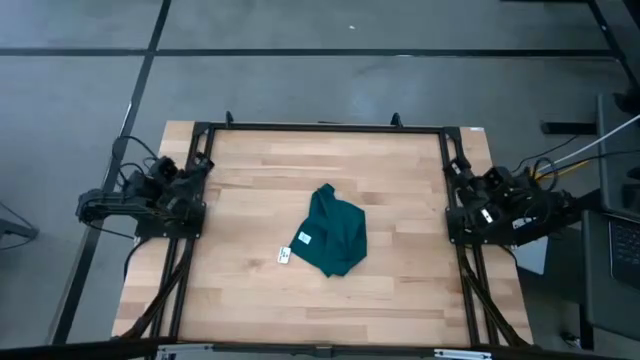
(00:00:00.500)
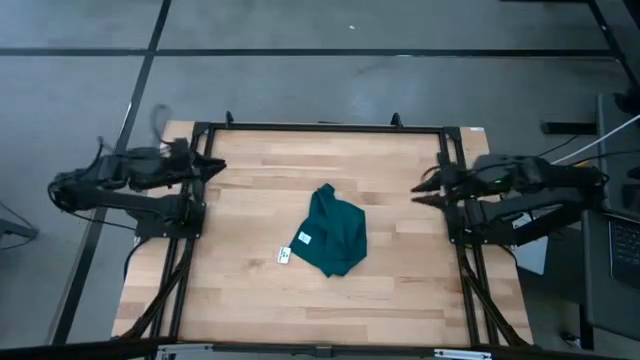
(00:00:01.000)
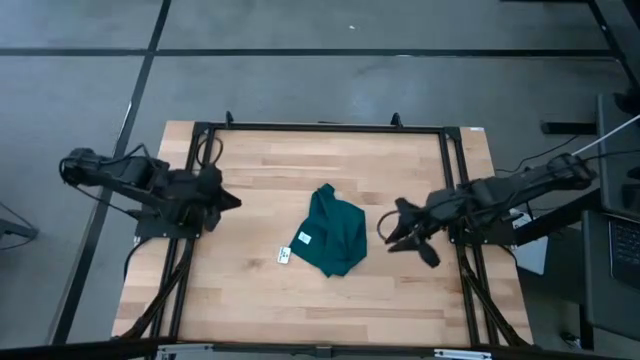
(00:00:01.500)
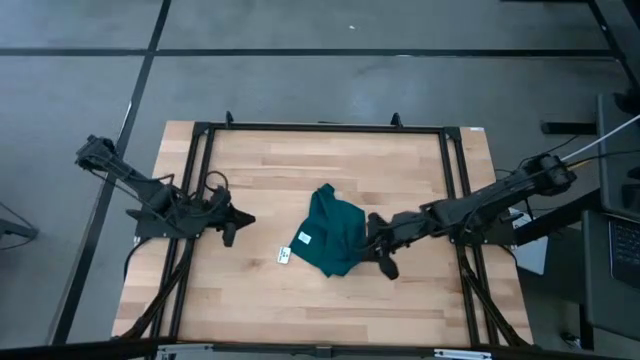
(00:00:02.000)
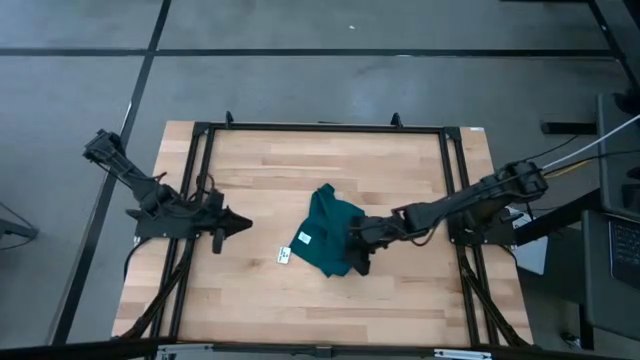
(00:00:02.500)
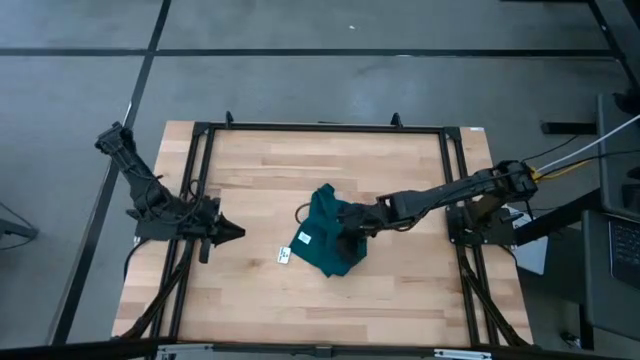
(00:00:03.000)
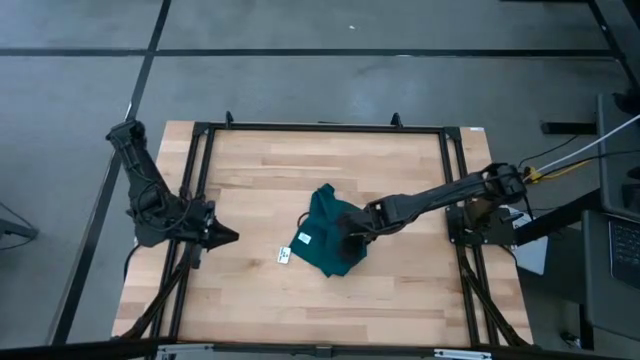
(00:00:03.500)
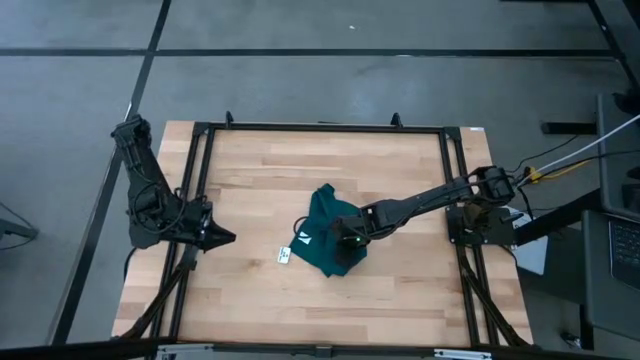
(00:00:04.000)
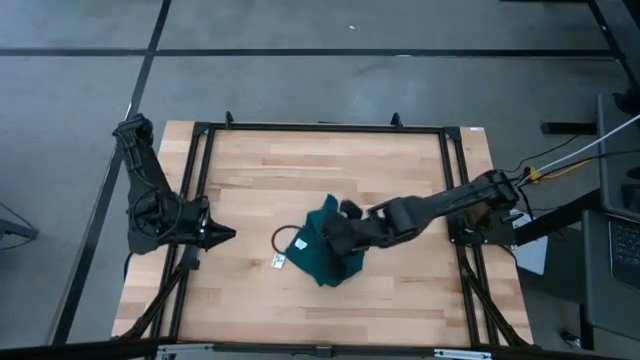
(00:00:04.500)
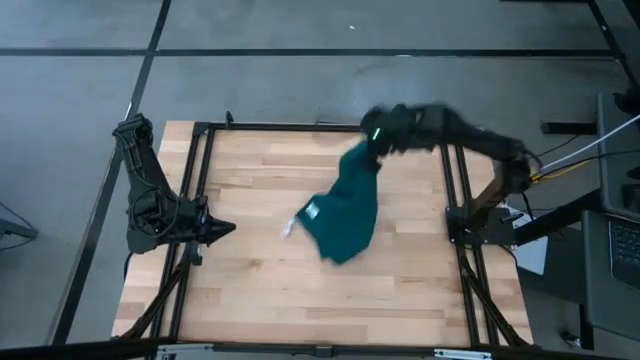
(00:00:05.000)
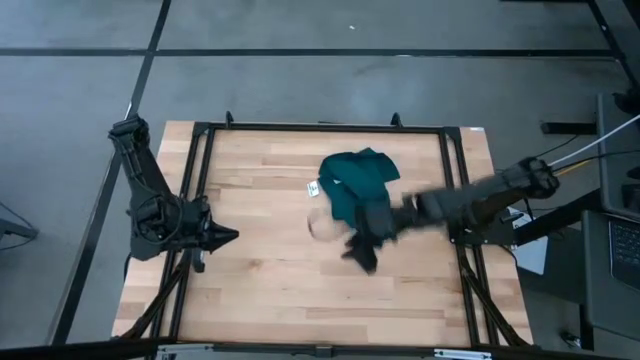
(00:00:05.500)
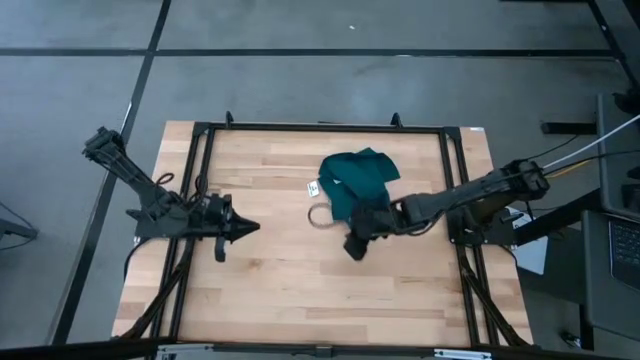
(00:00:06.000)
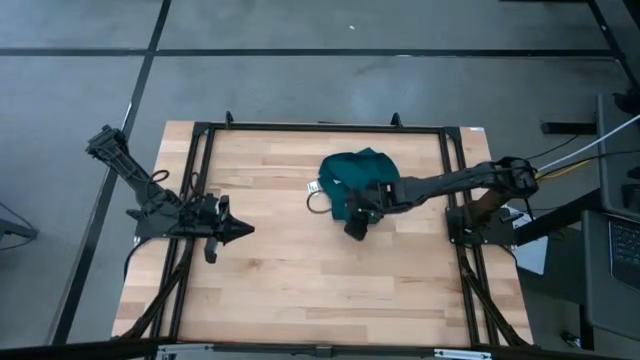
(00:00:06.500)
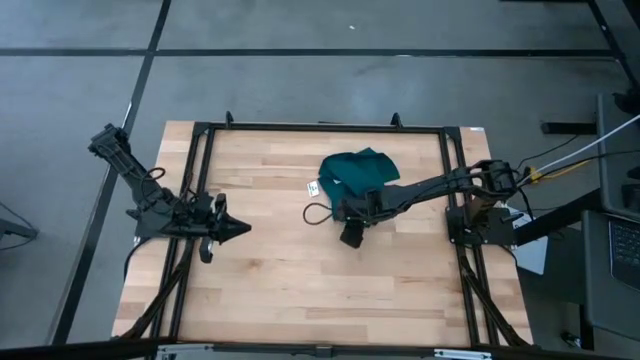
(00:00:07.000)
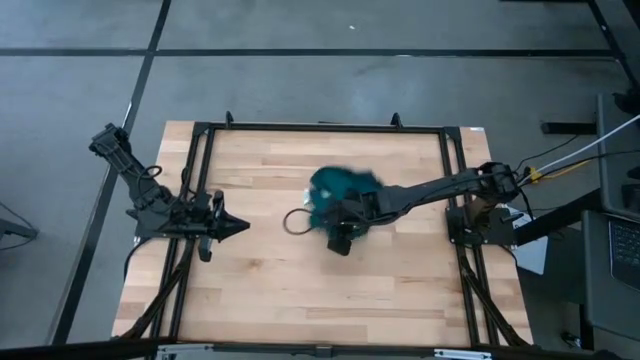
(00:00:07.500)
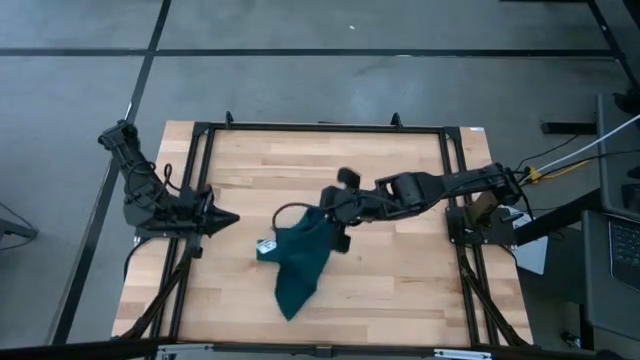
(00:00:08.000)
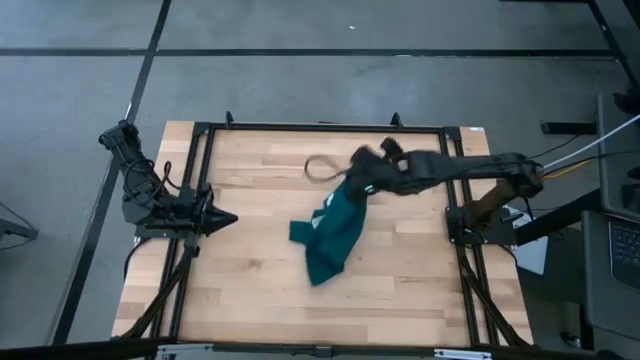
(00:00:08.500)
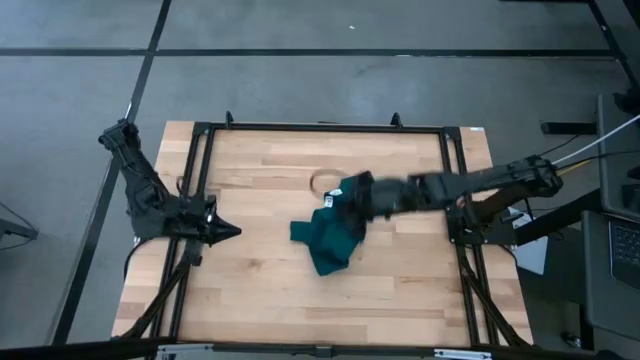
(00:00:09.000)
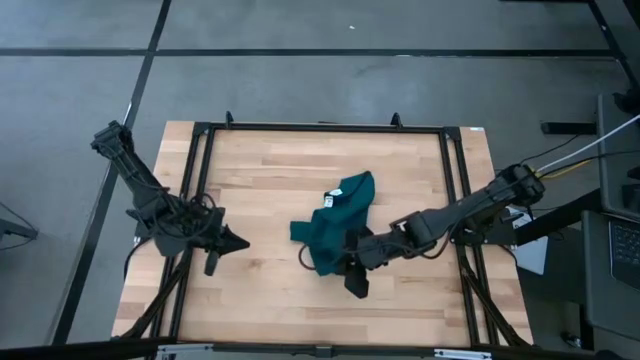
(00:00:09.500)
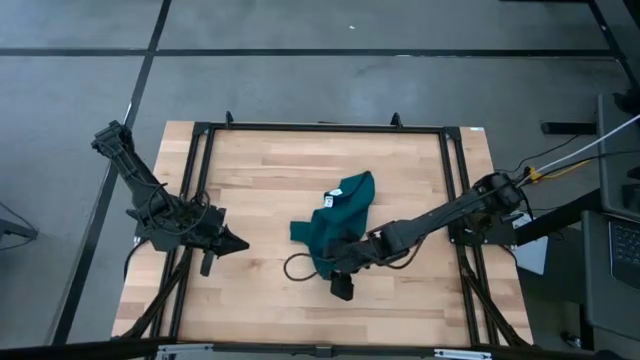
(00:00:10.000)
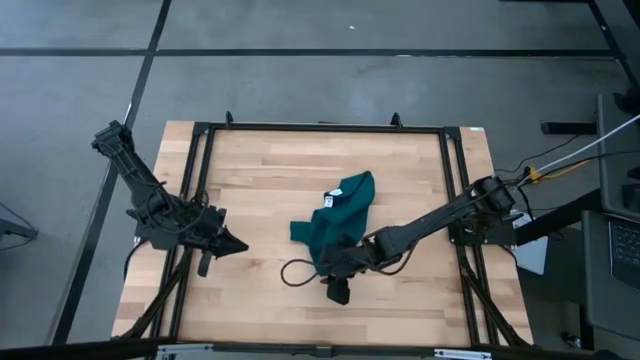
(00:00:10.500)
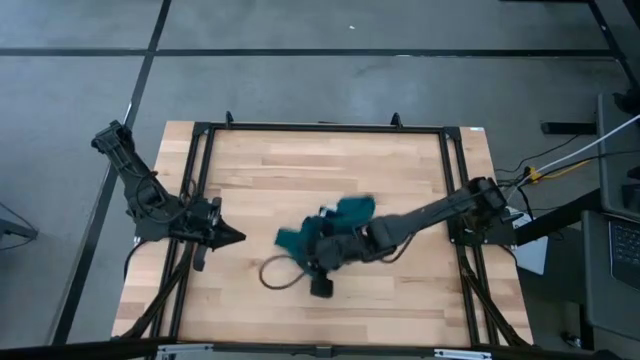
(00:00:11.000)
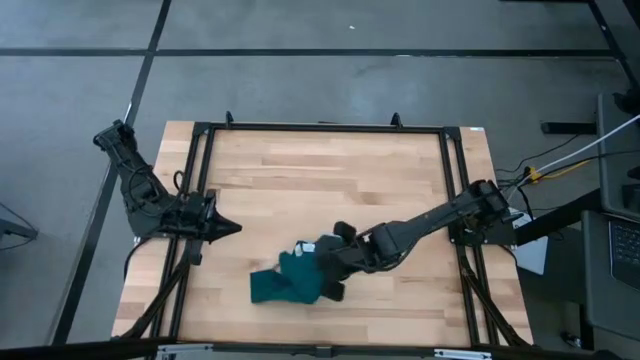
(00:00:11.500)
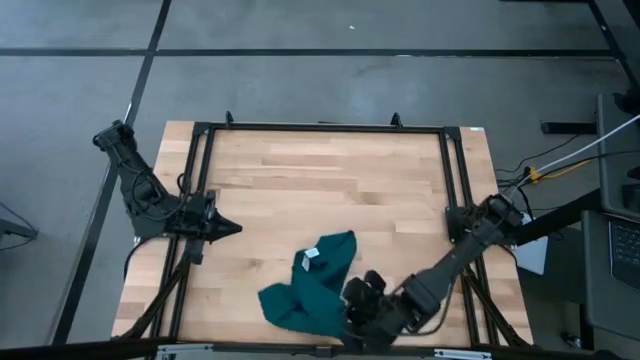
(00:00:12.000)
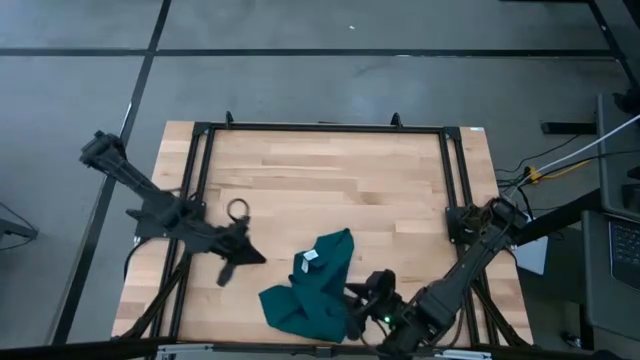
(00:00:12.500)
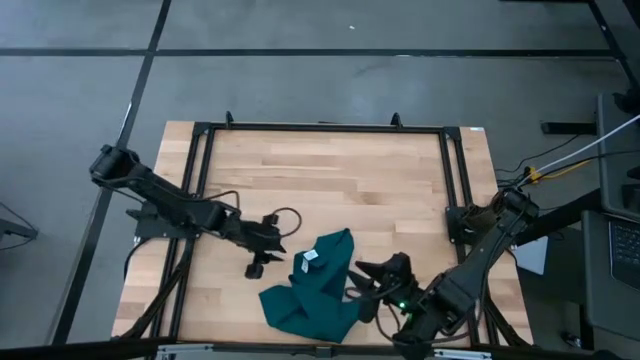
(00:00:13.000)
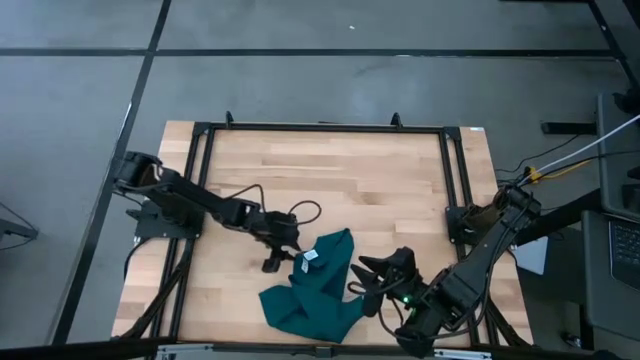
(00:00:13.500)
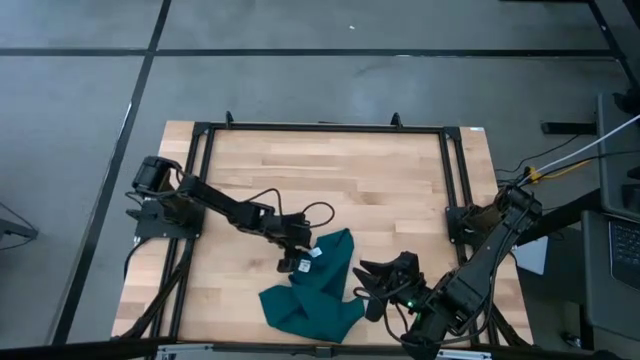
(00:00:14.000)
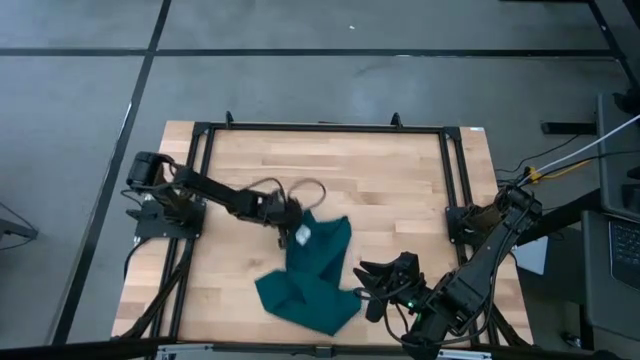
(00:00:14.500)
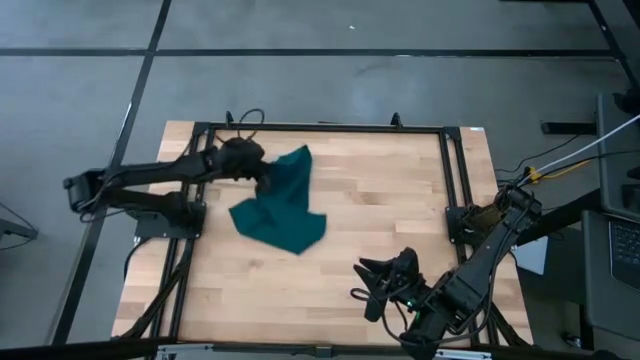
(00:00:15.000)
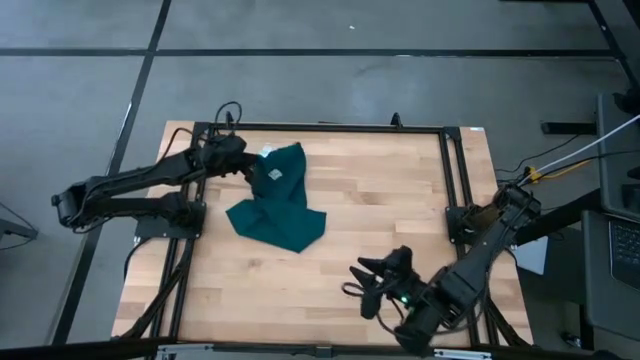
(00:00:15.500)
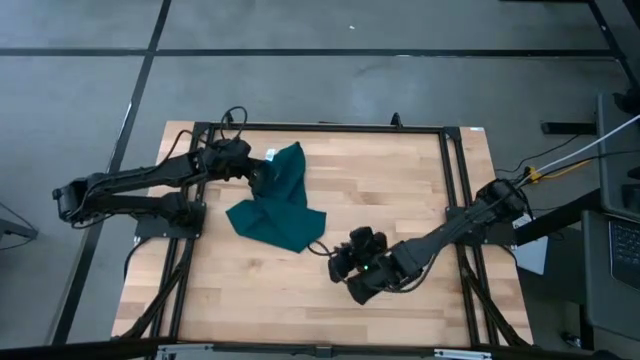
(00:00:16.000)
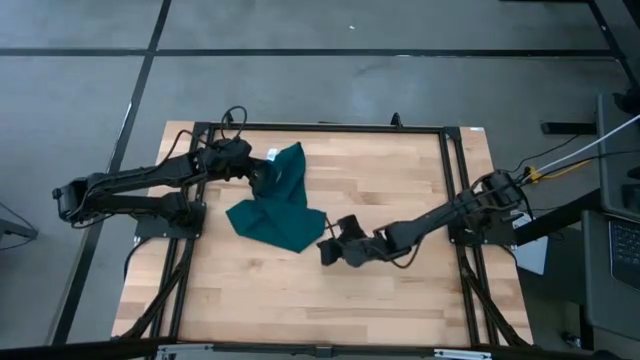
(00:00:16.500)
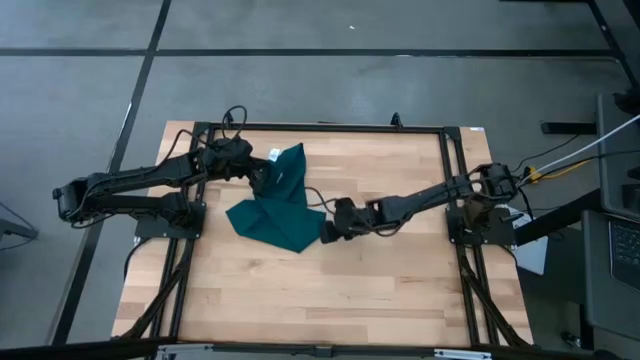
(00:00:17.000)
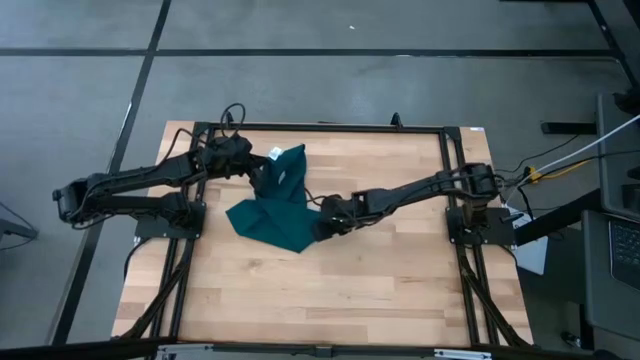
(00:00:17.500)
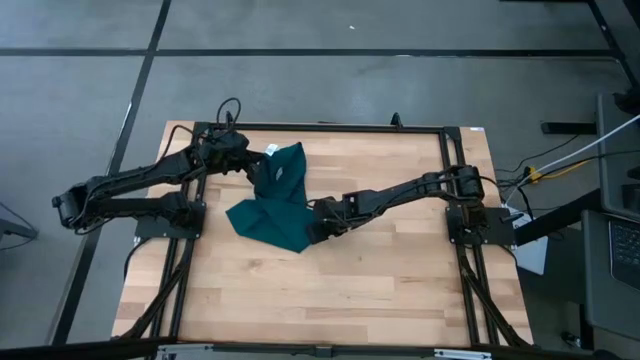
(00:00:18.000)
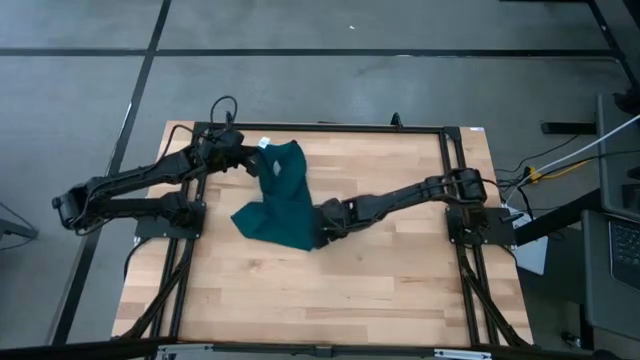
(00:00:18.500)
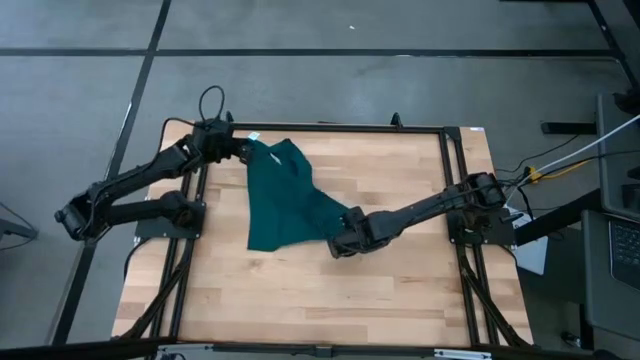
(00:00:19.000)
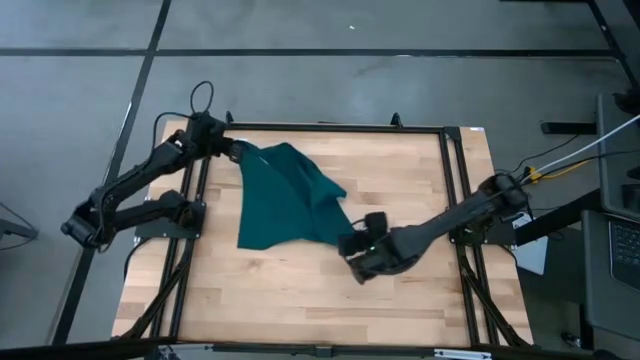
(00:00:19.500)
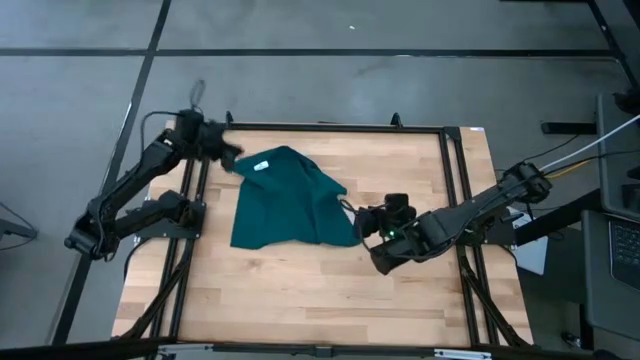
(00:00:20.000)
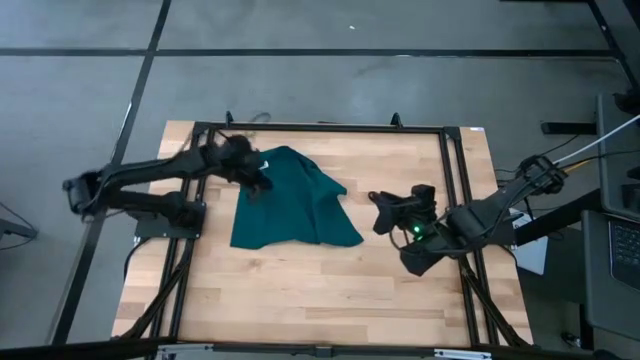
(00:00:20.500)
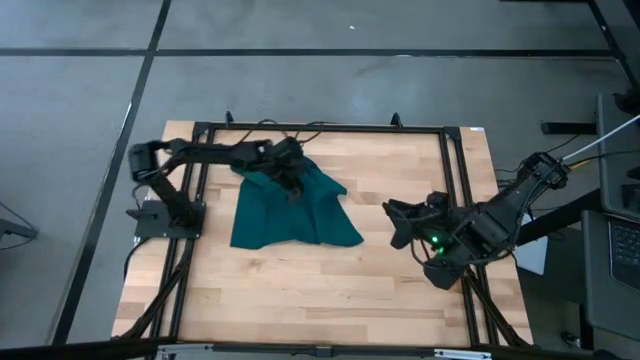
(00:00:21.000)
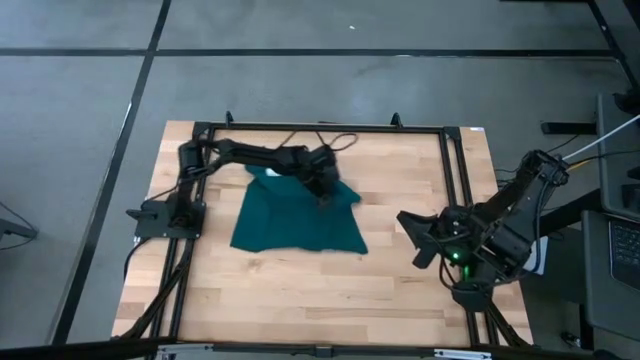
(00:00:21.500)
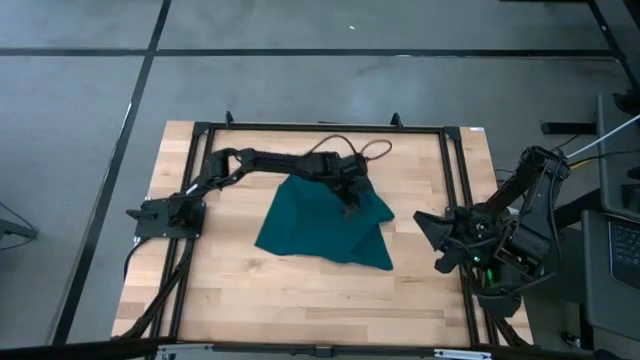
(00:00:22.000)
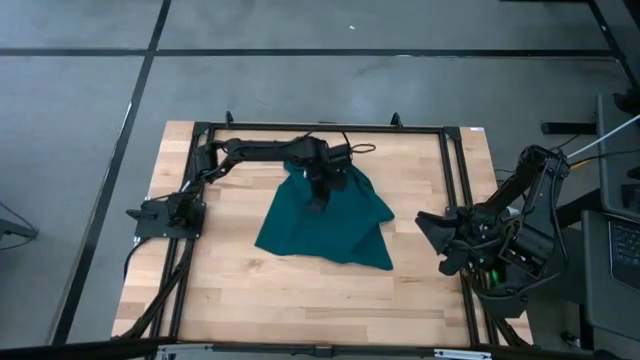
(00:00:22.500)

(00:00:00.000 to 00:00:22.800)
Task: Fold microfiber towels
Fold the green towel
